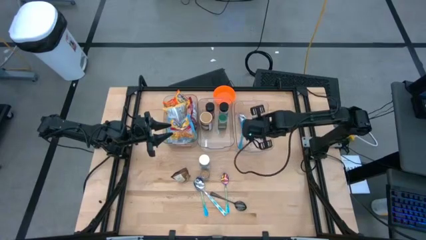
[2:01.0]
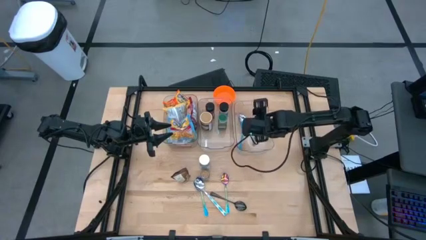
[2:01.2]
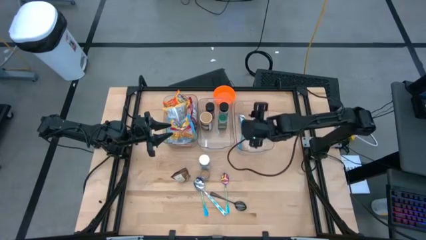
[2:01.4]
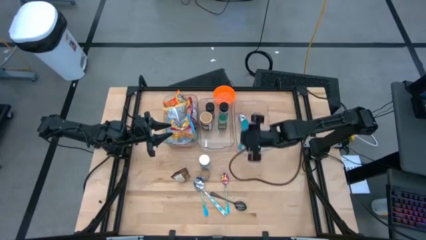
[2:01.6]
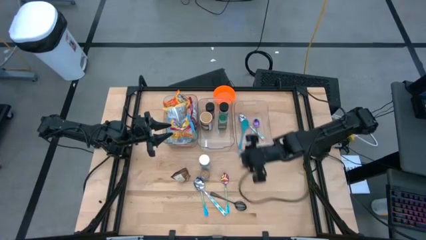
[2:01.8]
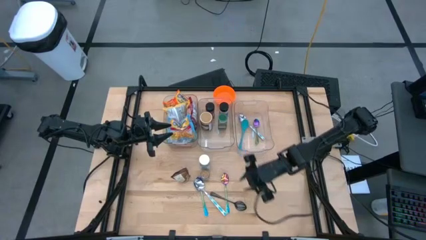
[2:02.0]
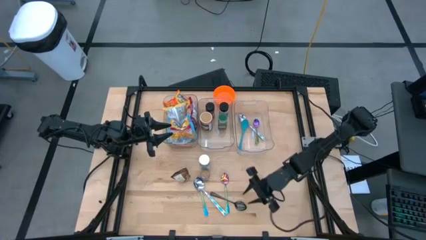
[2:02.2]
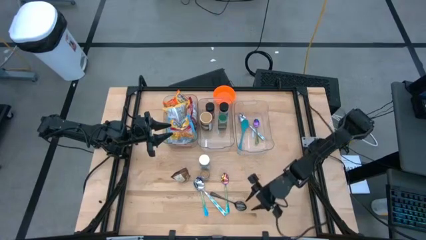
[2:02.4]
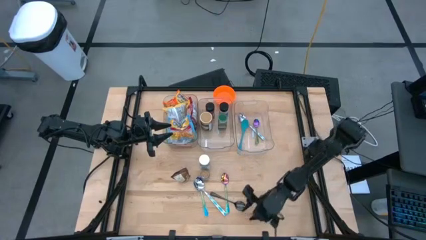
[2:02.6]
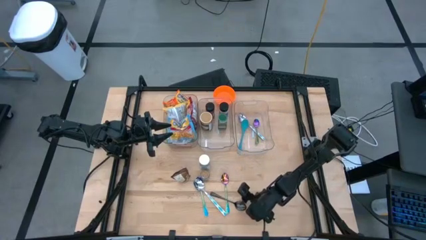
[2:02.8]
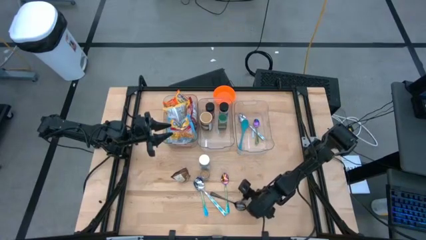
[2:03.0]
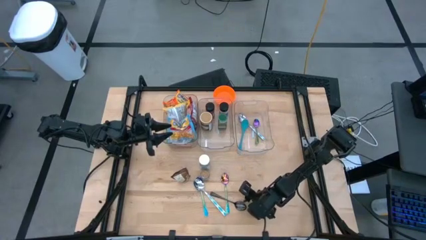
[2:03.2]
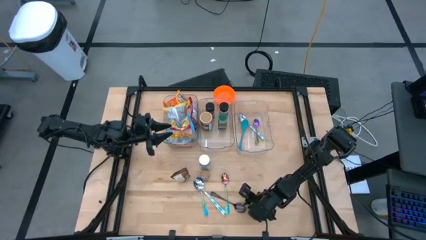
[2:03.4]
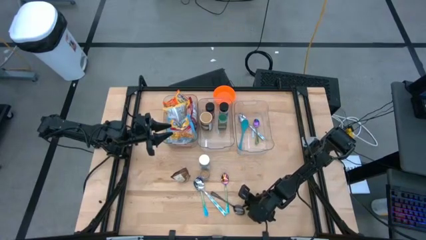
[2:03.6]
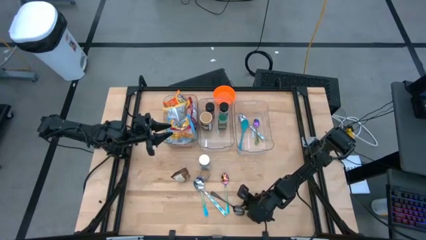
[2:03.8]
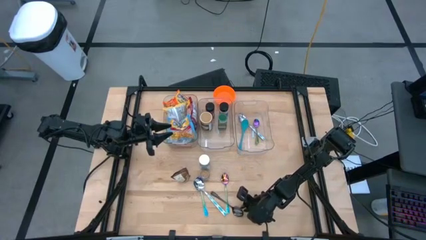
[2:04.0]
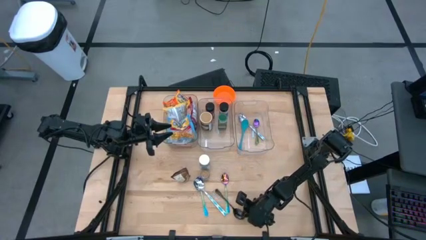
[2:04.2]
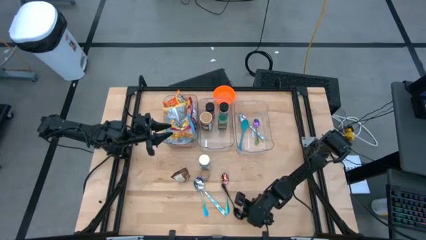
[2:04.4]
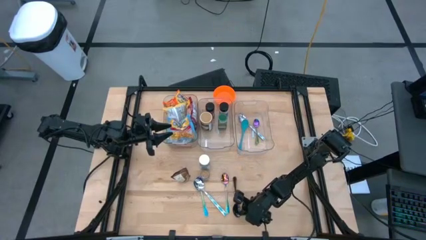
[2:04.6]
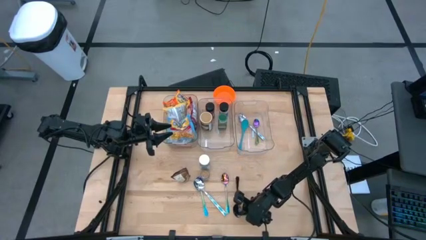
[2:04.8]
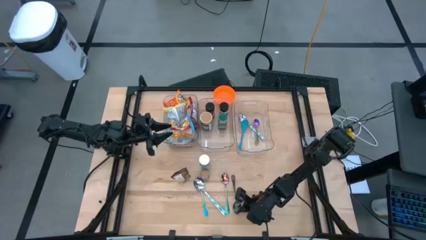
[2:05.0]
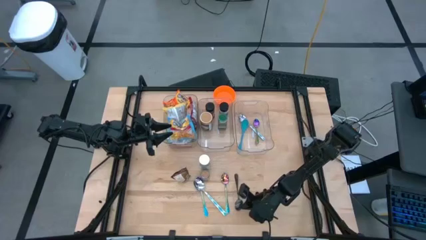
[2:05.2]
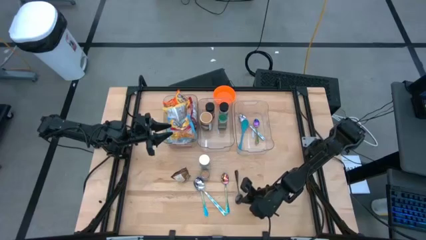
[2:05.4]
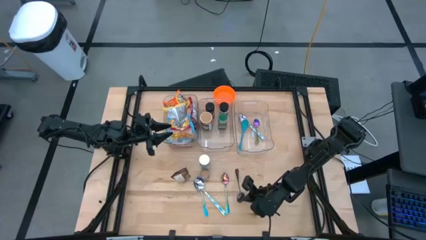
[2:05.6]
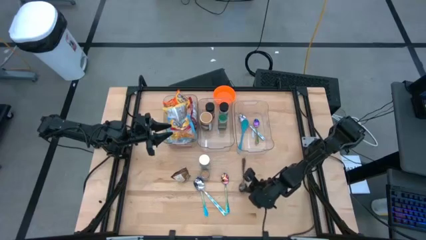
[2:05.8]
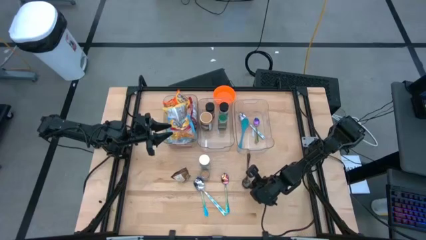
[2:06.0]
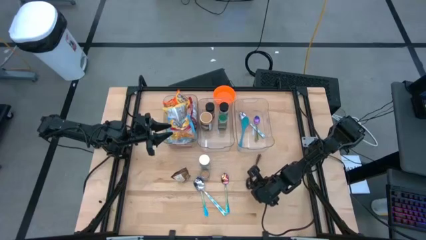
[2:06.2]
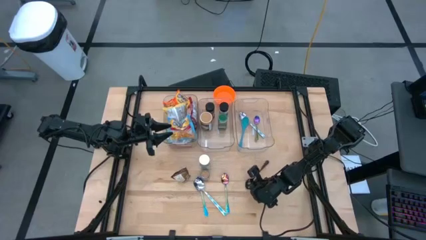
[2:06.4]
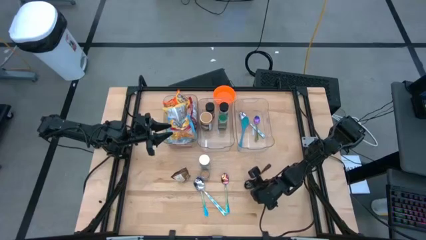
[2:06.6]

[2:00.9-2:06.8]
Task: Pick & Place Food Item
Put the black spoon into the right transparent bin

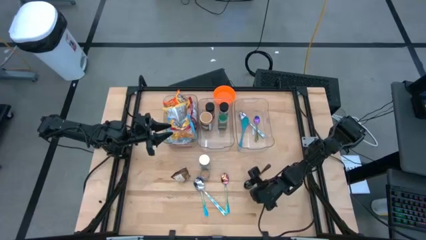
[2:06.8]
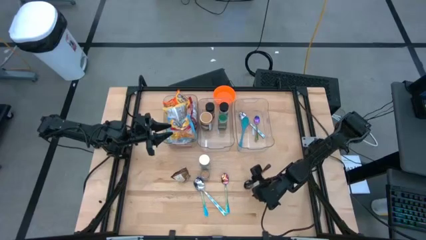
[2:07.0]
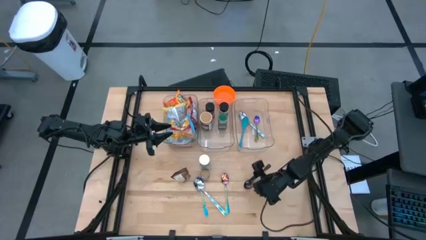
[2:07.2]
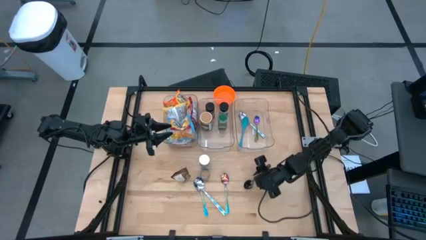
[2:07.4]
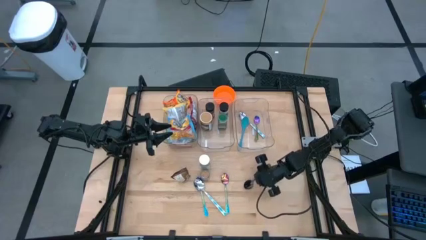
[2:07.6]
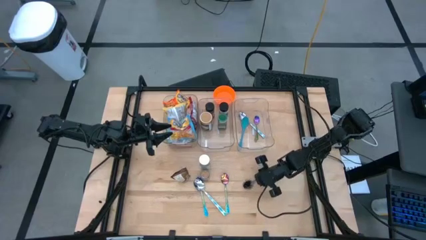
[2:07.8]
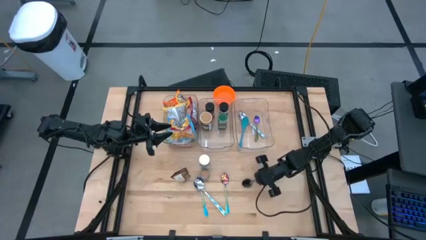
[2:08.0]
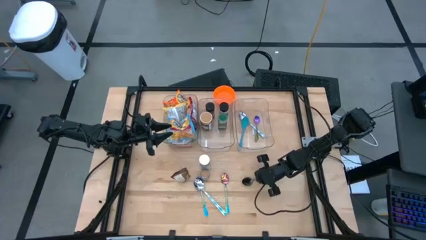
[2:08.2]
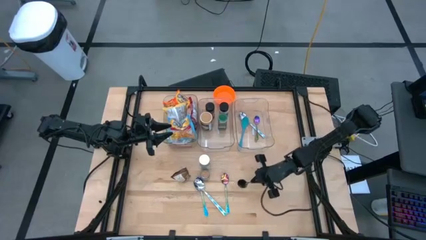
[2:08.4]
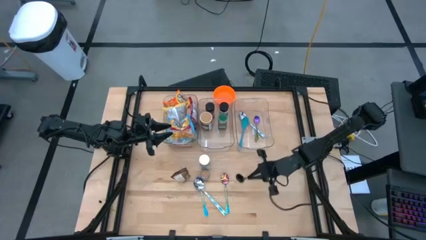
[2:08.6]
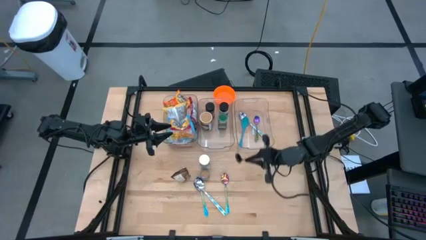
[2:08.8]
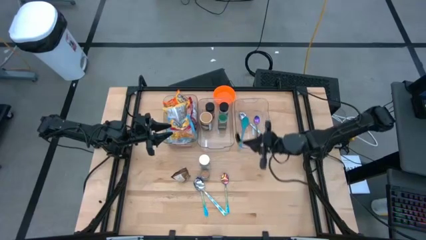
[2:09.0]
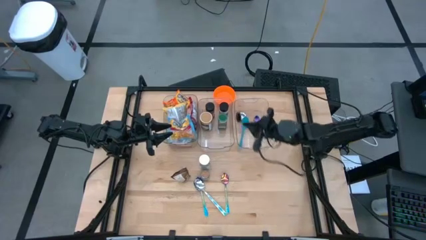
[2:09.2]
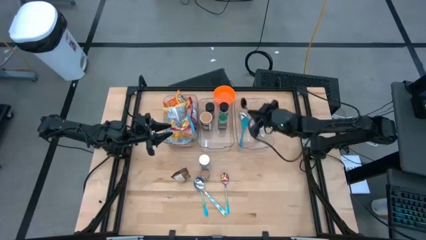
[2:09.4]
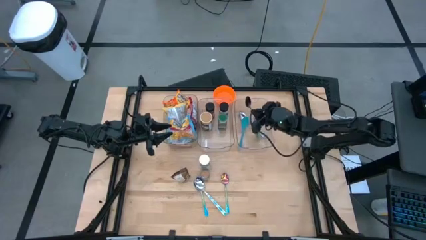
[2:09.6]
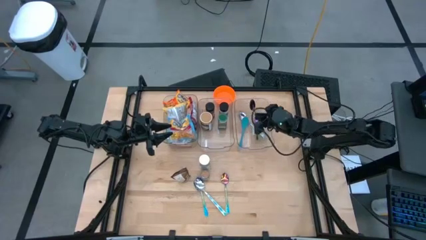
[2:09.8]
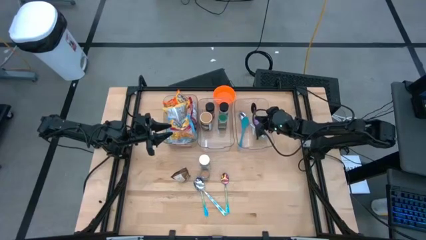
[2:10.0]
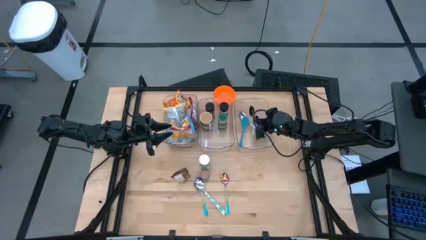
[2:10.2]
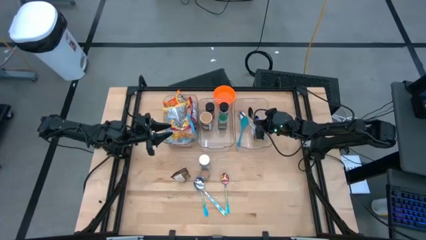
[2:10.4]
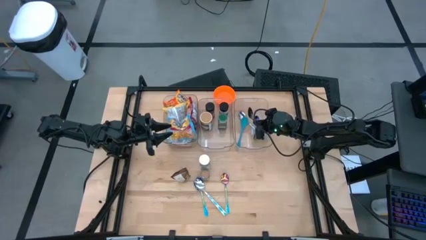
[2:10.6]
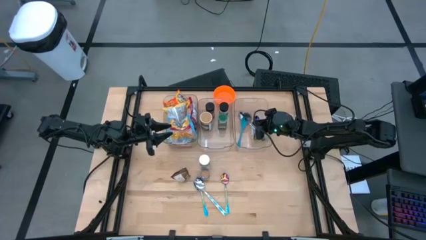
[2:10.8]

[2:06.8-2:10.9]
Put the black spoon into the right transparent bin

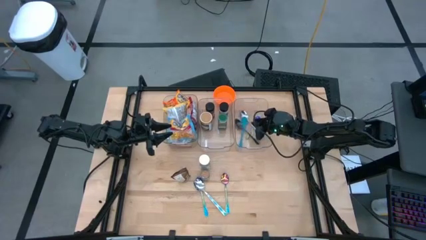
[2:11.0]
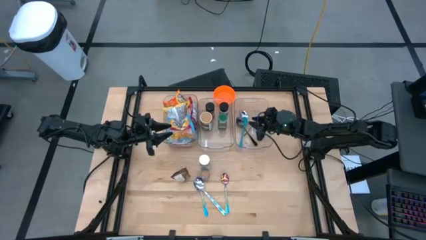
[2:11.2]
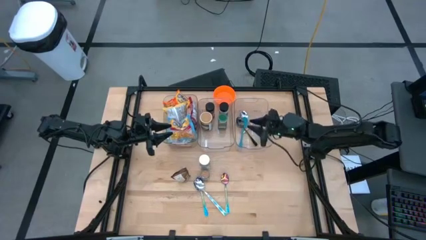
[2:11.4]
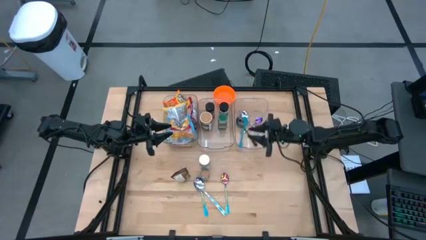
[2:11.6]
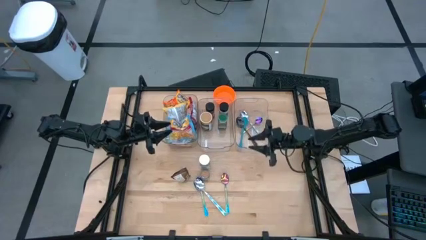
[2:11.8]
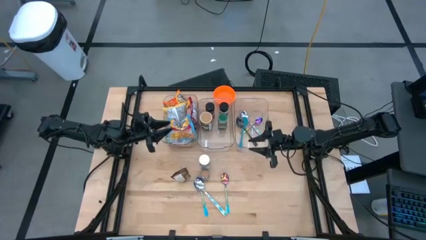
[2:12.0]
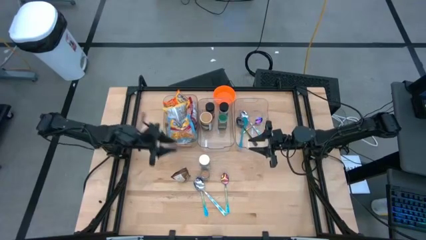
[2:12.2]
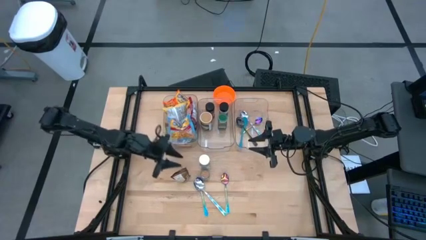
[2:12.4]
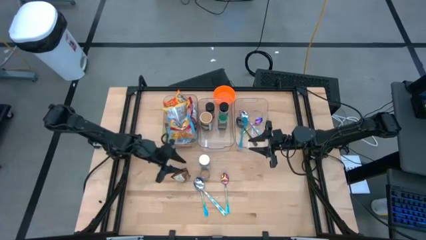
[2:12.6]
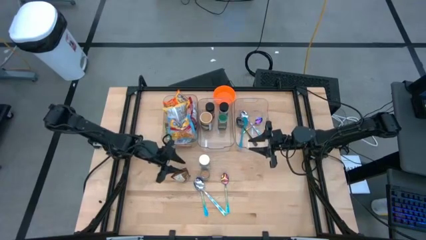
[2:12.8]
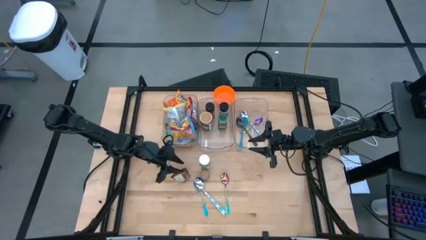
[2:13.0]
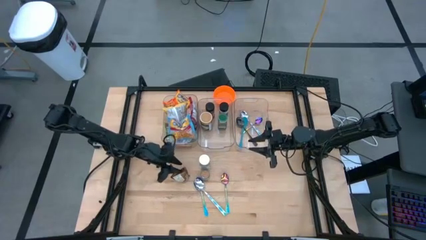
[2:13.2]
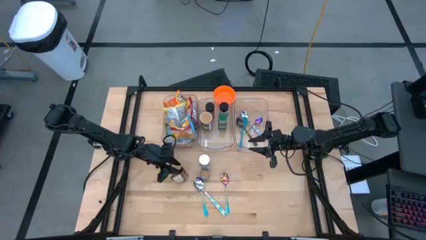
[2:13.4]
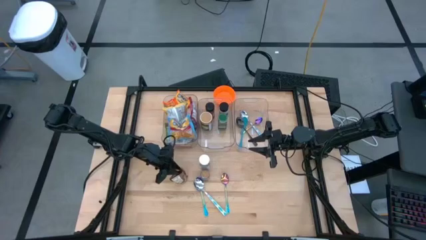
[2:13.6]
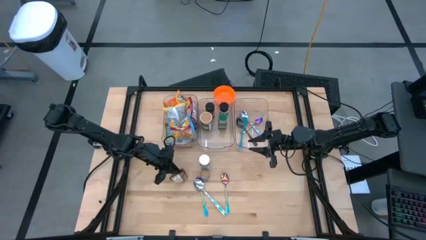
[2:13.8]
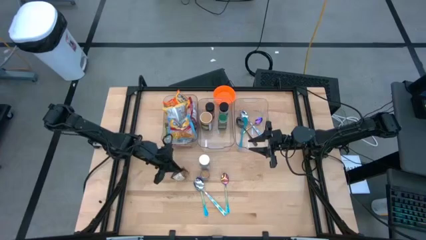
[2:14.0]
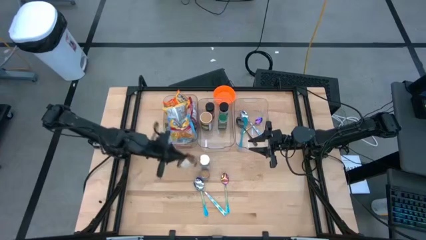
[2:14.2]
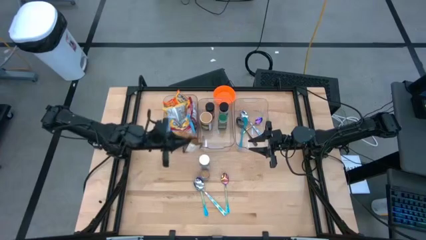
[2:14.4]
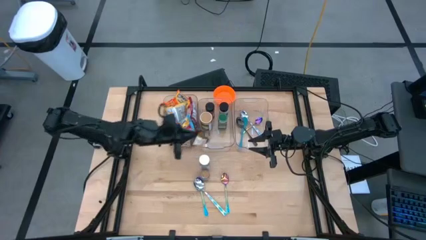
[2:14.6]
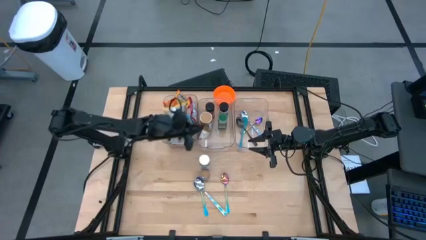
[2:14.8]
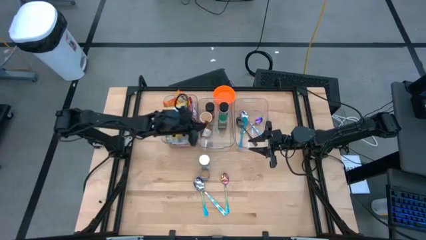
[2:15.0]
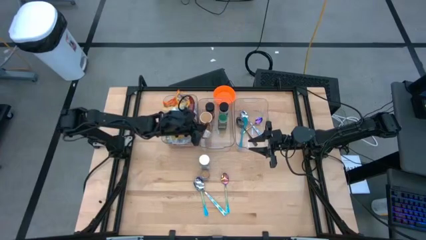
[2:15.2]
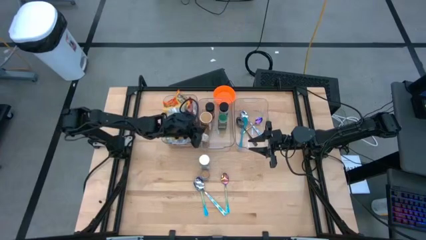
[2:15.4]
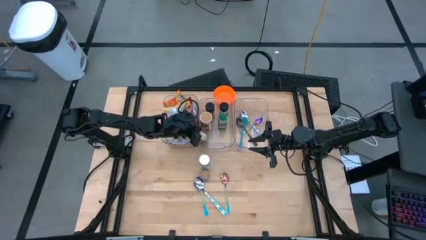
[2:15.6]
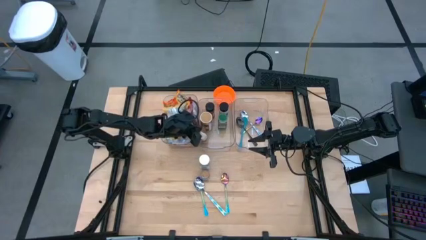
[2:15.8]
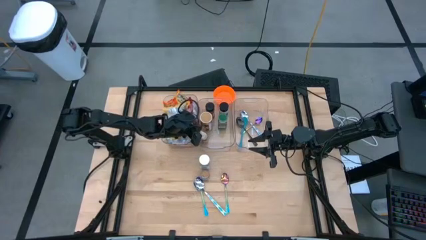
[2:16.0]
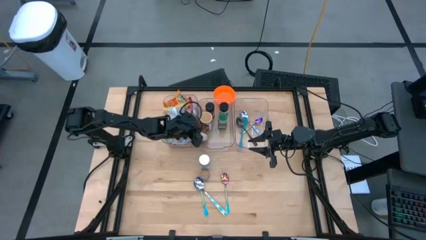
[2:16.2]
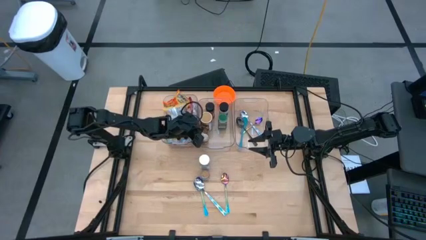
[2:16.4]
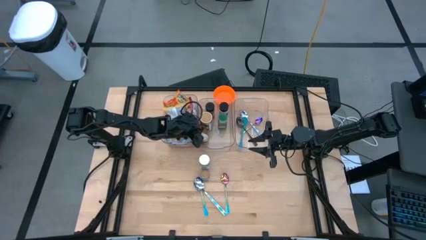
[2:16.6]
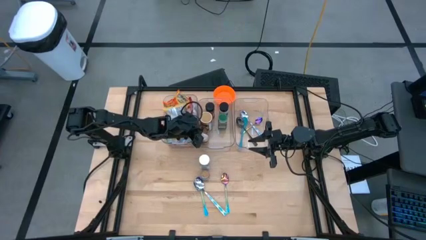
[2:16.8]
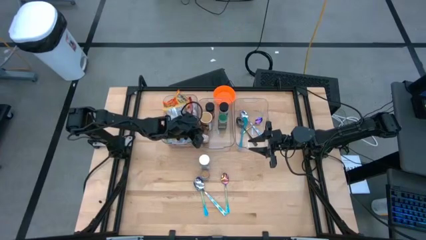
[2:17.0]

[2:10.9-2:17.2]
Put the orange seasoning pack into the middle transparent bin
